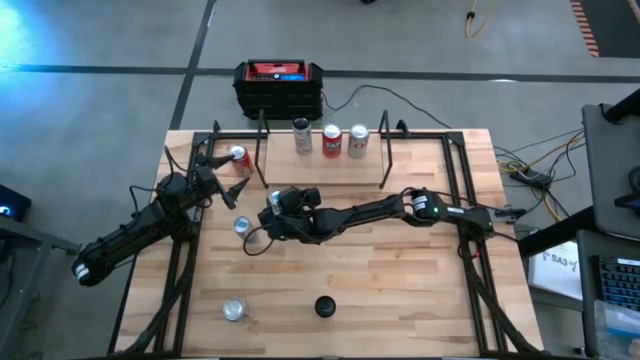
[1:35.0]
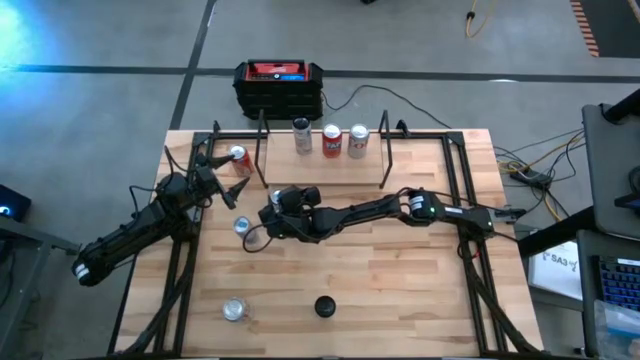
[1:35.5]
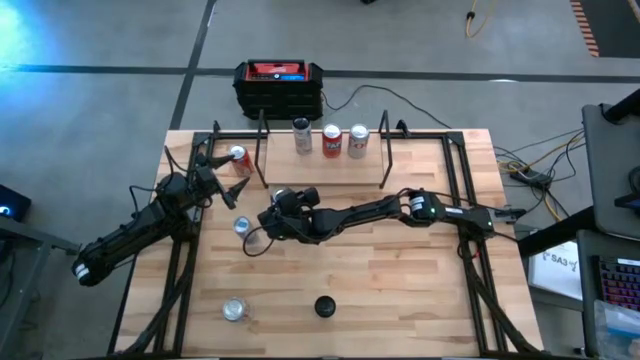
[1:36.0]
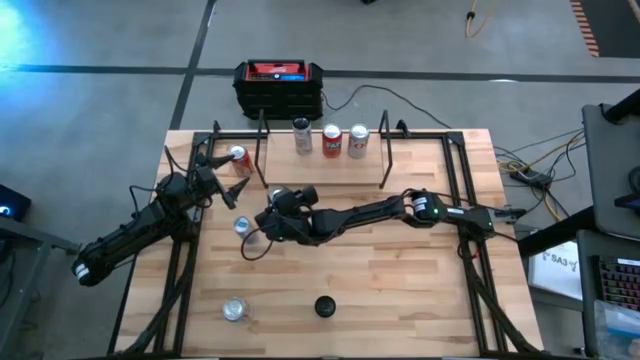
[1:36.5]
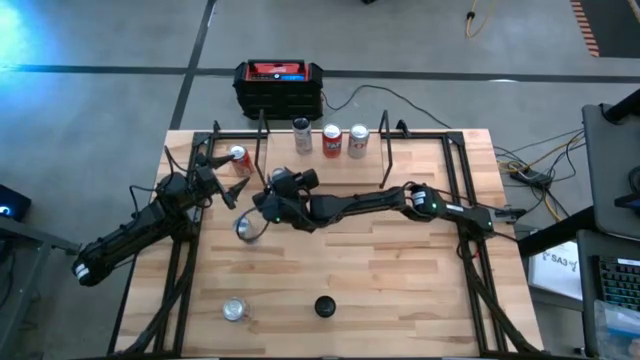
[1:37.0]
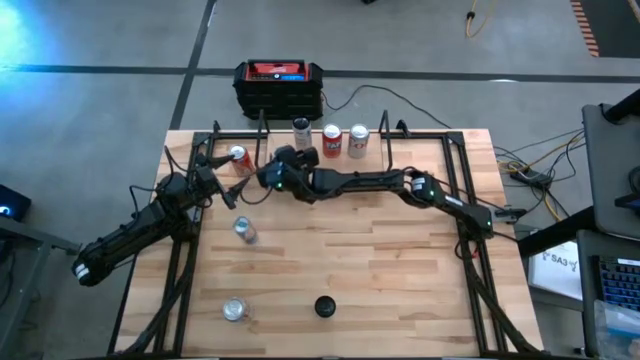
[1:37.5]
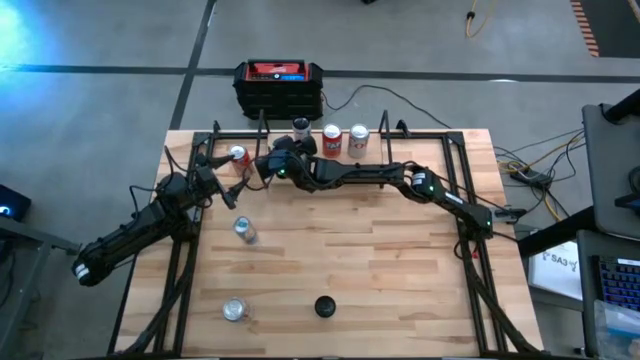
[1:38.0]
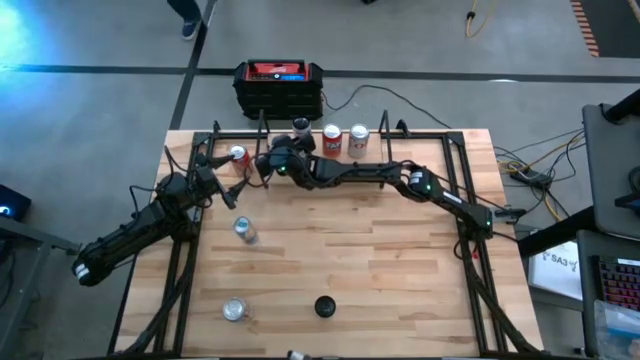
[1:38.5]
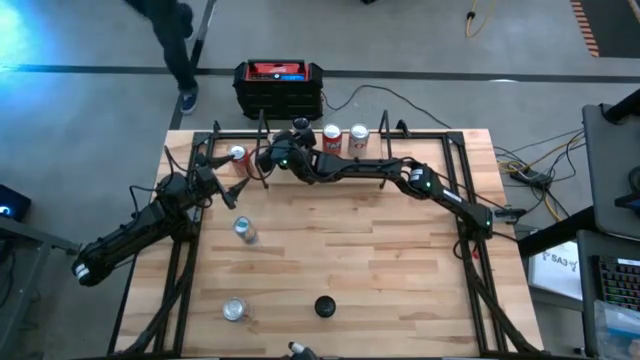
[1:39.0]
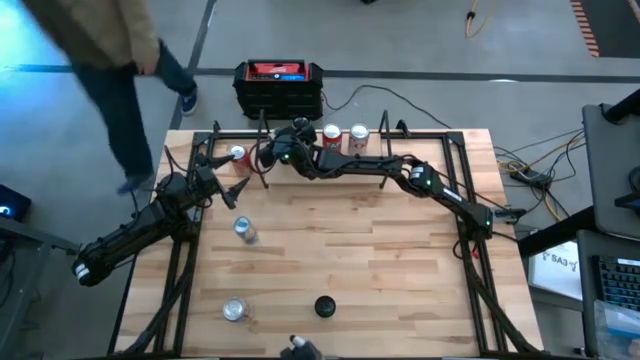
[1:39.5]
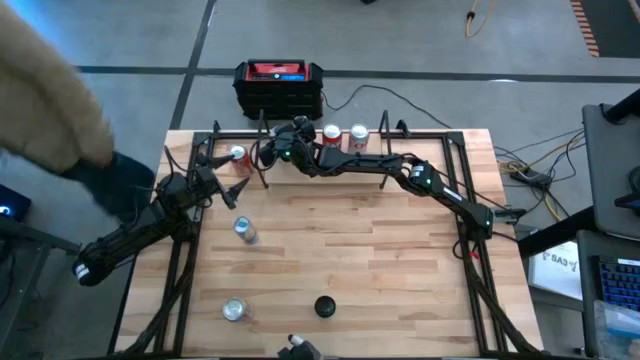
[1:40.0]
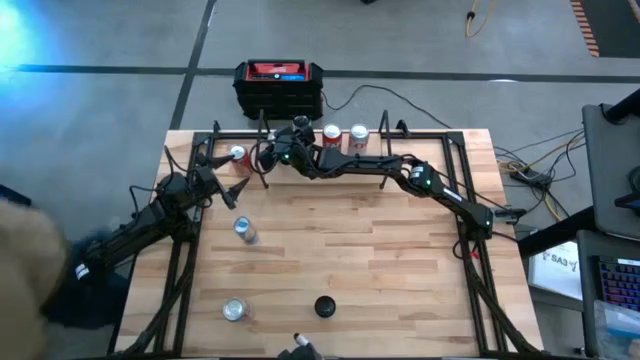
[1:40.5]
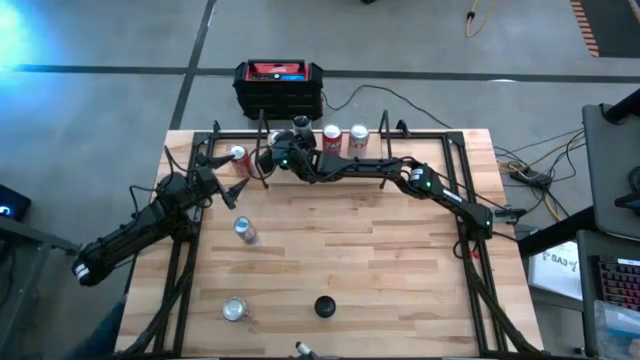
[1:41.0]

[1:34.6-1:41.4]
Task: Place canned beverage on shelf
Put the top blue soda can on the shelf

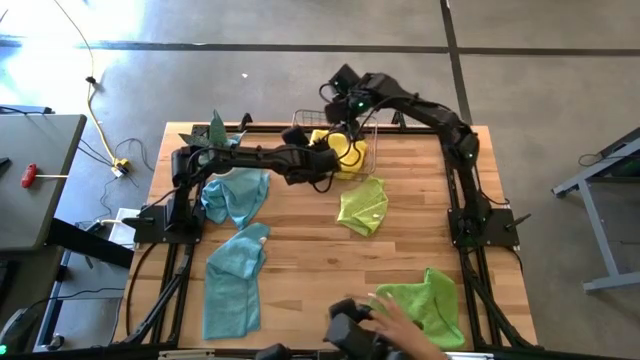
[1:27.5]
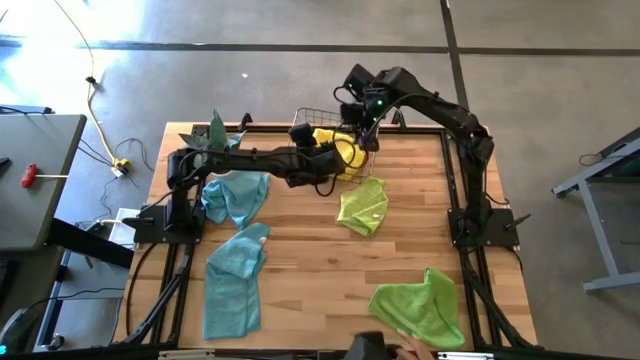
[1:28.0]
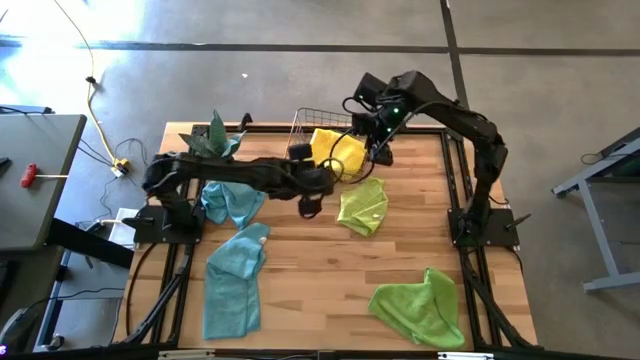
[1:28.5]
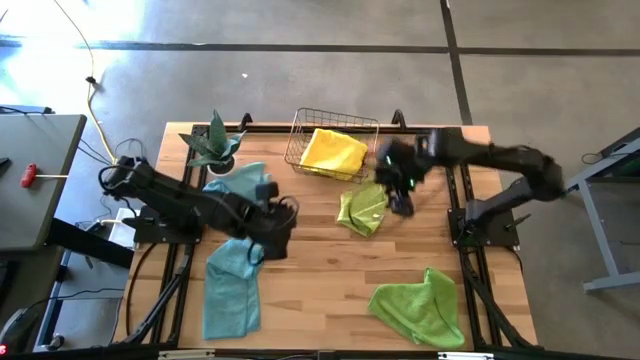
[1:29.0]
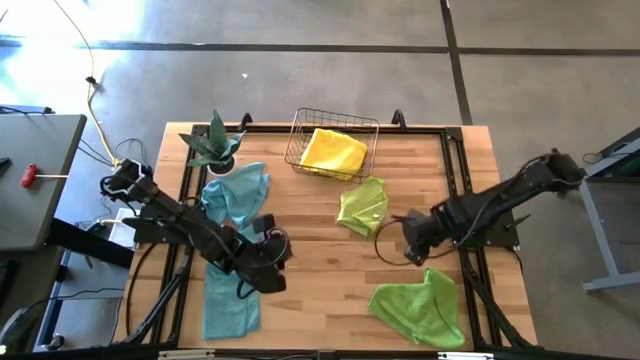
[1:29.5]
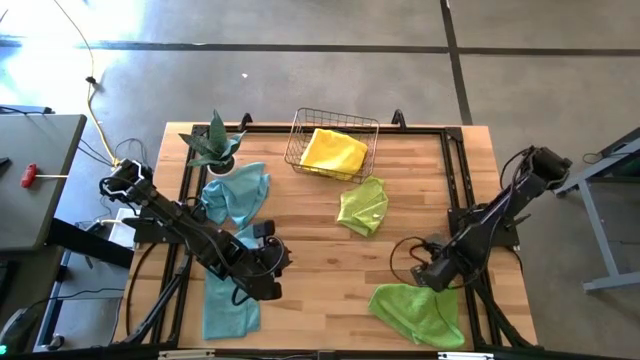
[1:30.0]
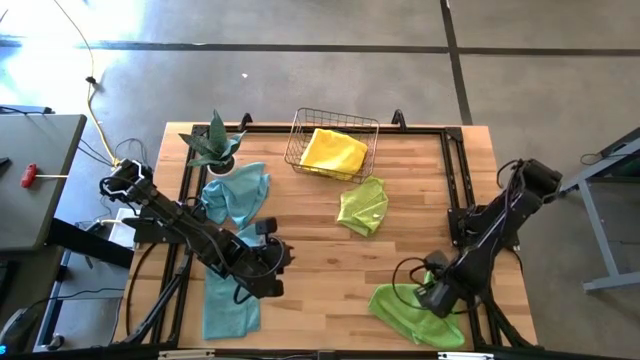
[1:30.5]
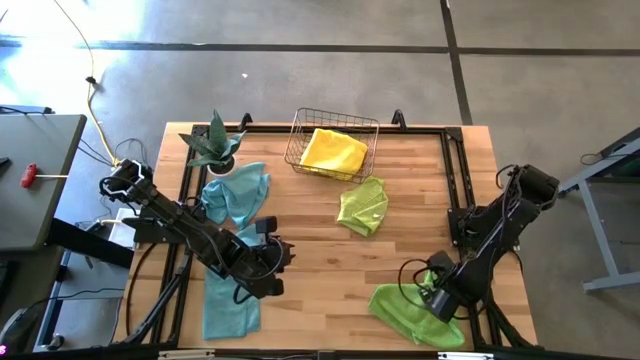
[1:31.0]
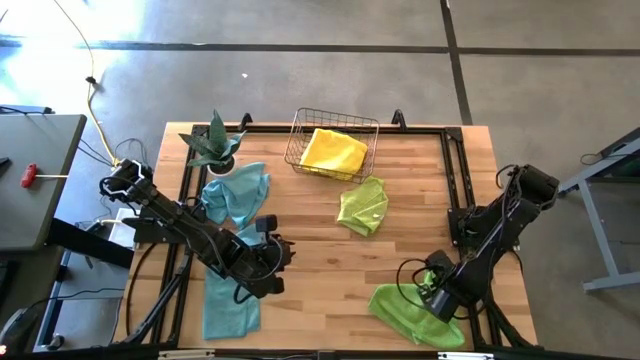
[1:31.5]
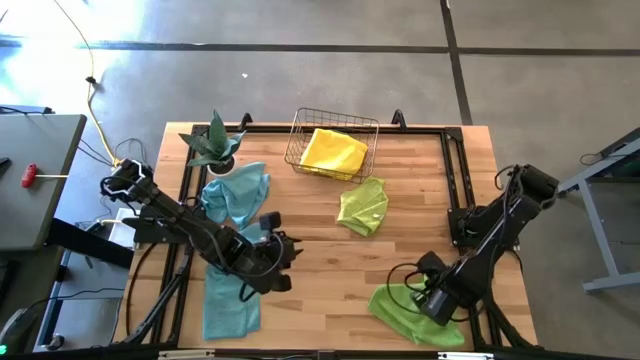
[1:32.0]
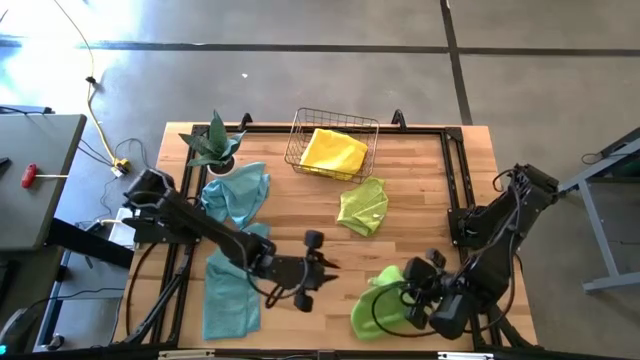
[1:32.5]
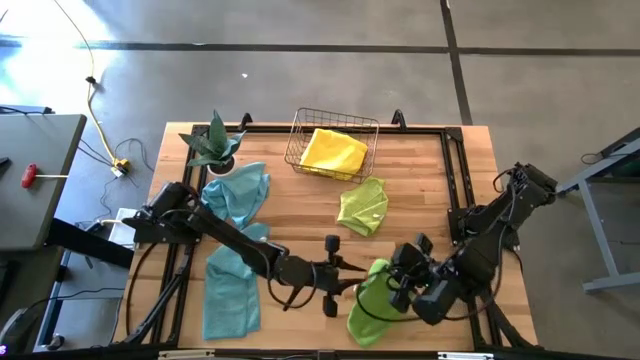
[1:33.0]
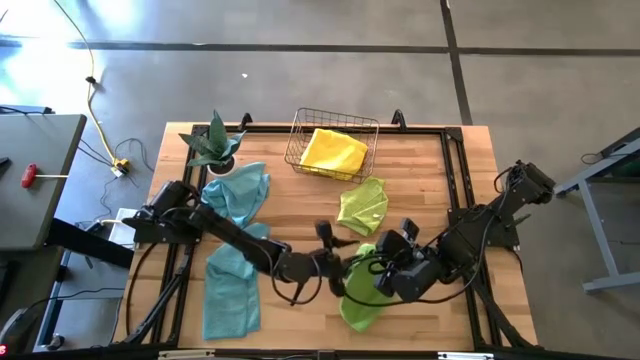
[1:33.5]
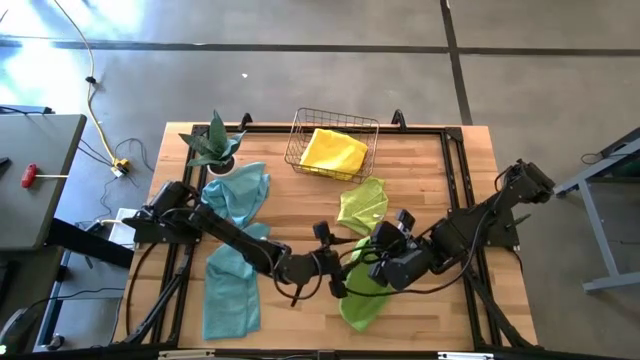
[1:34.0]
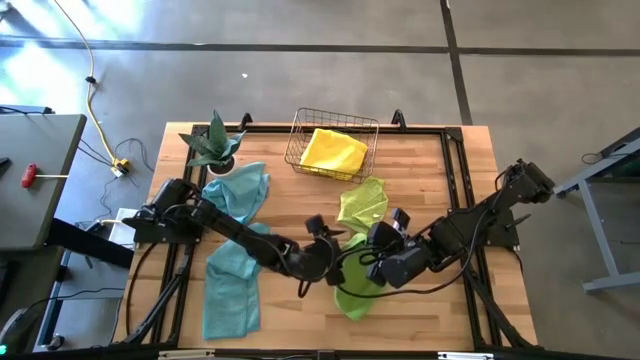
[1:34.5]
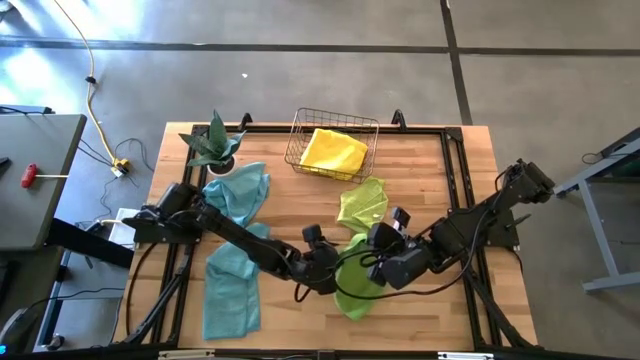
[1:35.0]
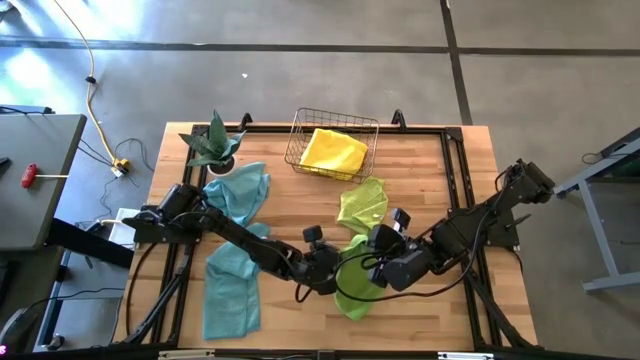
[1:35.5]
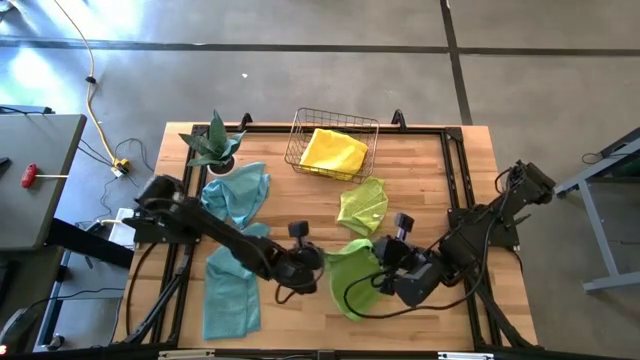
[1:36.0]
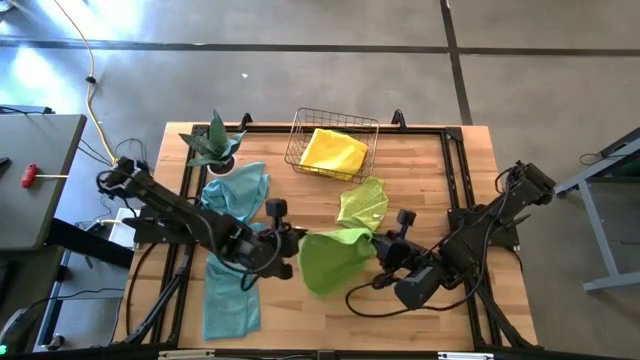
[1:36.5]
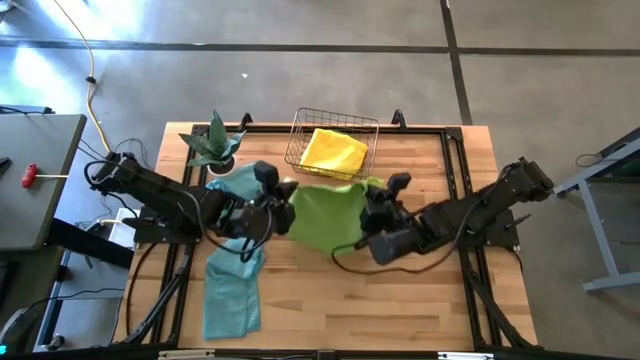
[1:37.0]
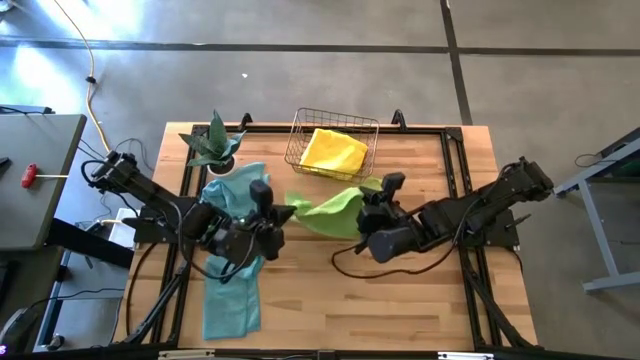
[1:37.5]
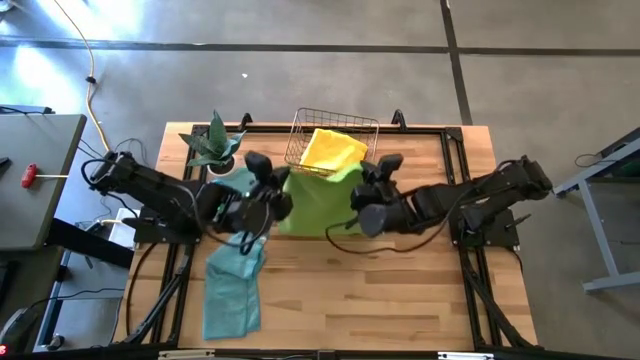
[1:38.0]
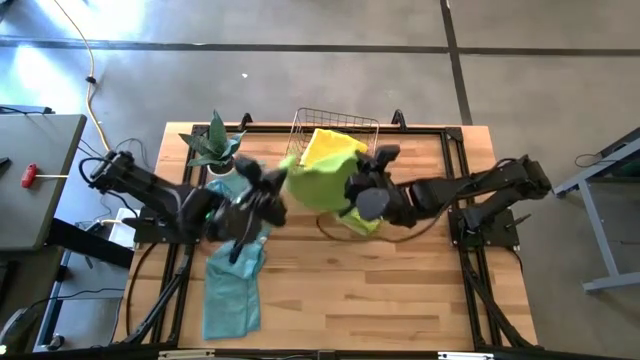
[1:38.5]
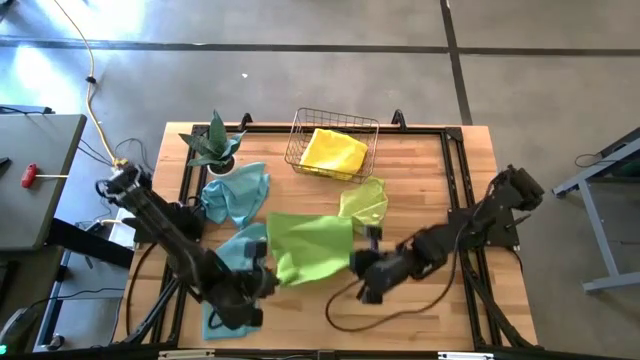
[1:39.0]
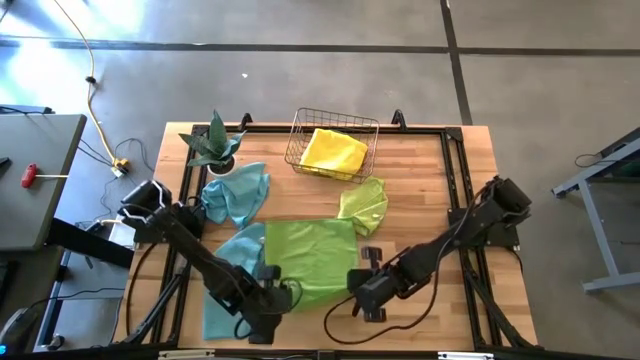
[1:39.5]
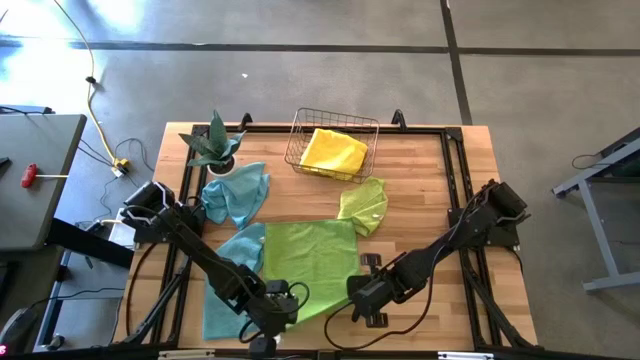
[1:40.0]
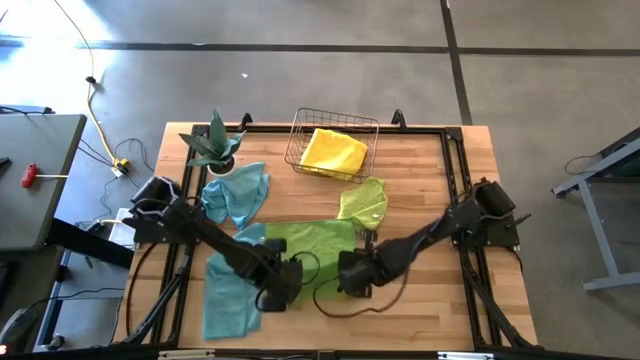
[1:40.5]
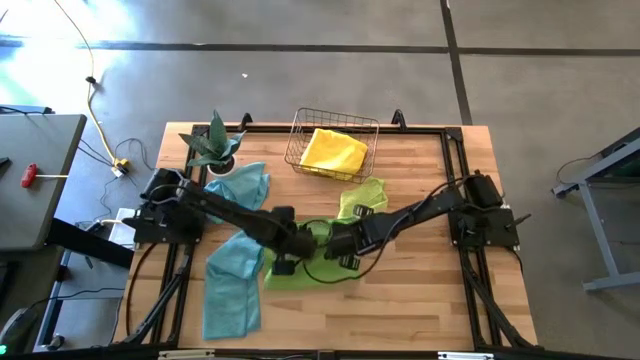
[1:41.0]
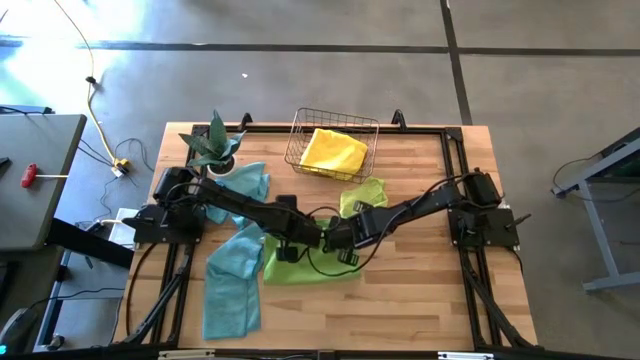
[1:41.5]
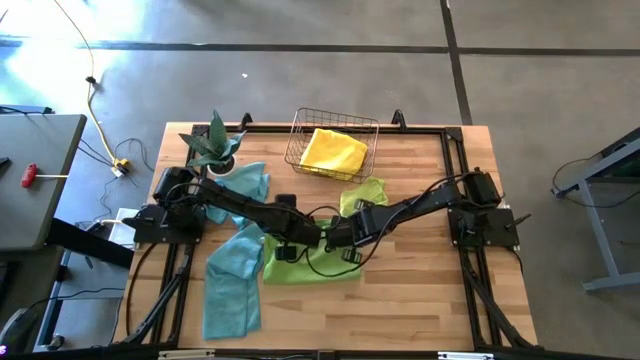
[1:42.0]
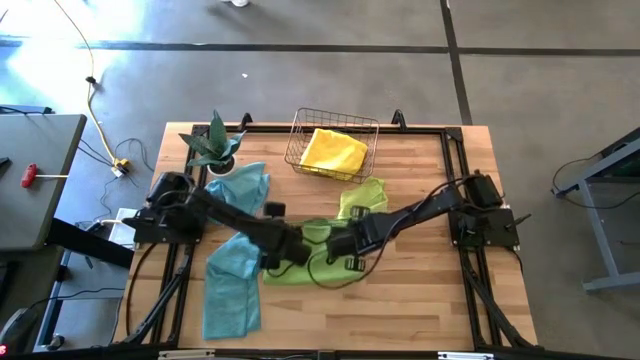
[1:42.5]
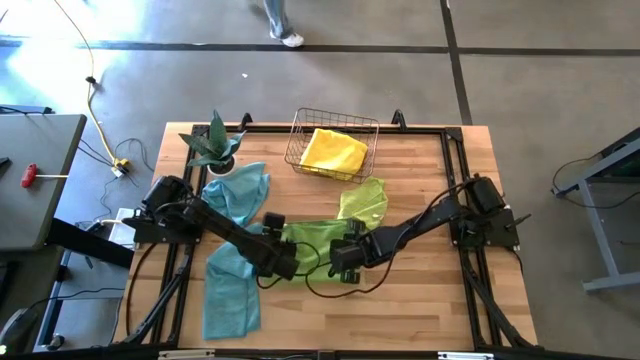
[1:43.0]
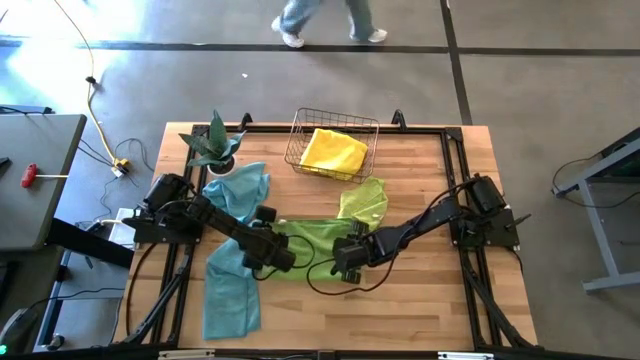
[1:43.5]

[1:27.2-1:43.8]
Task: Fold microfiber towels
Fold the green microfiber towel
